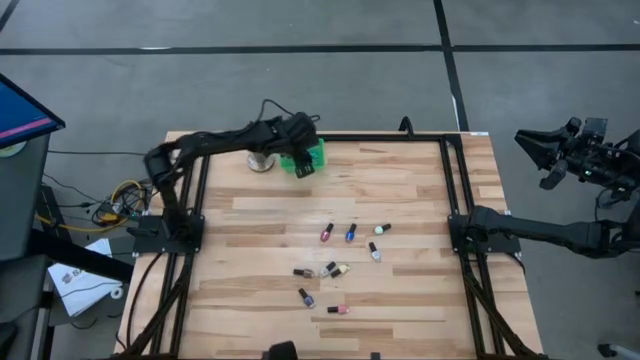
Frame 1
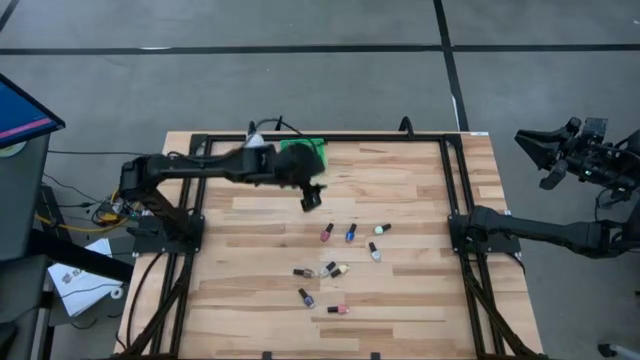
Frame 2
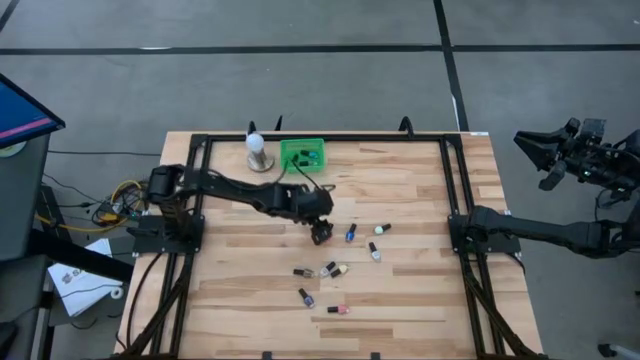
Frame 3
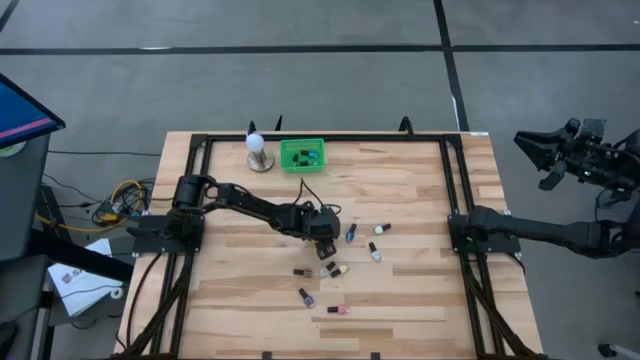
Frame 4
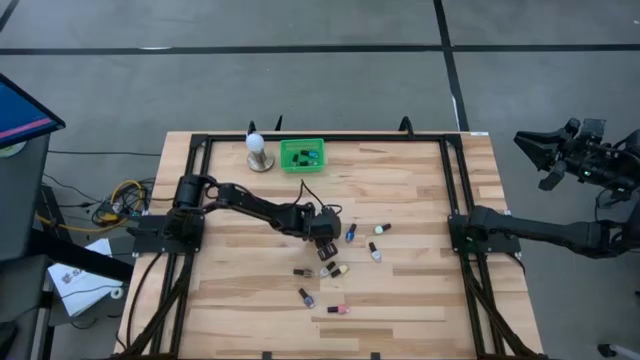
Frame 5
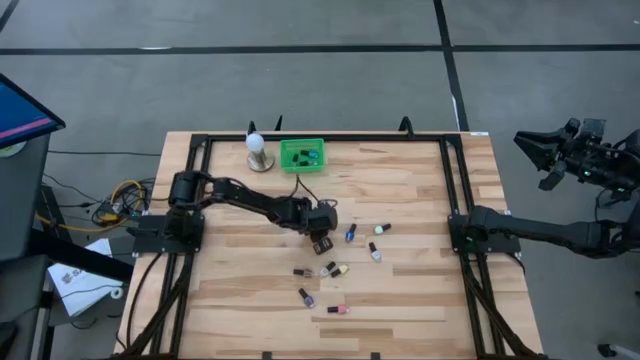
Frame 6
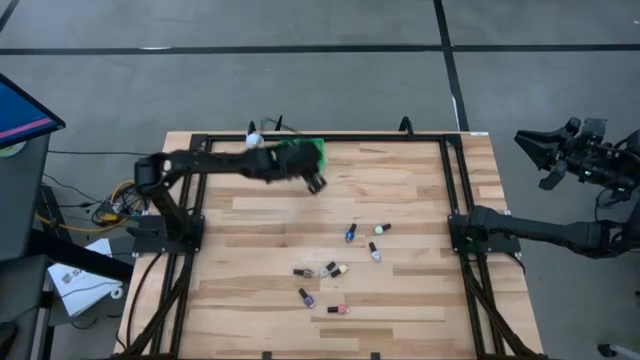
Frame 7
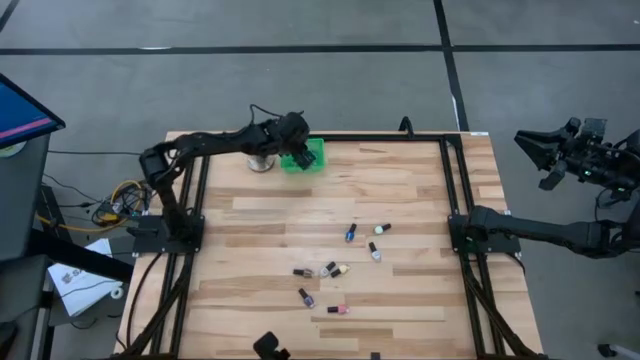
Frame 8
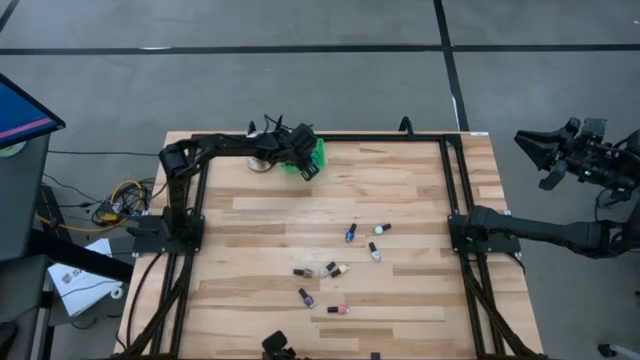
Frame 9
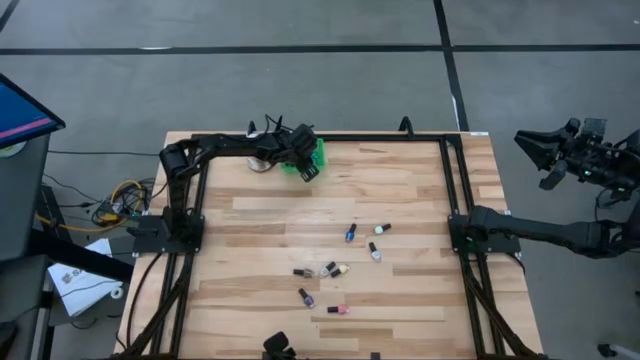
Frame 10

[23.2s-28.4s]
Task: Pick & Place Nail Polish
Put the dark pink nail polish into the green bin

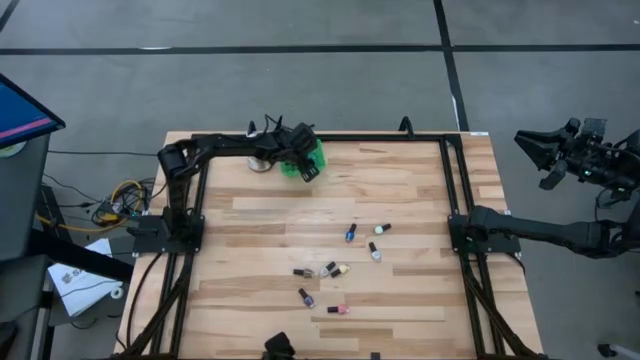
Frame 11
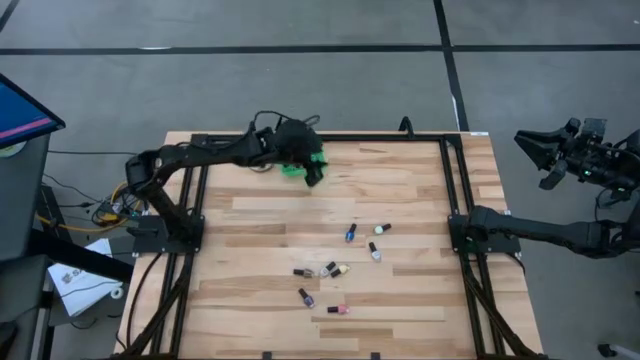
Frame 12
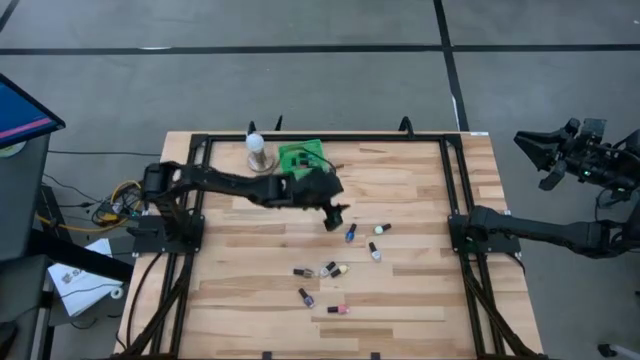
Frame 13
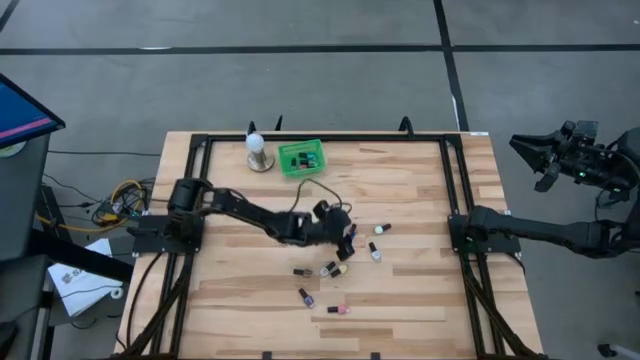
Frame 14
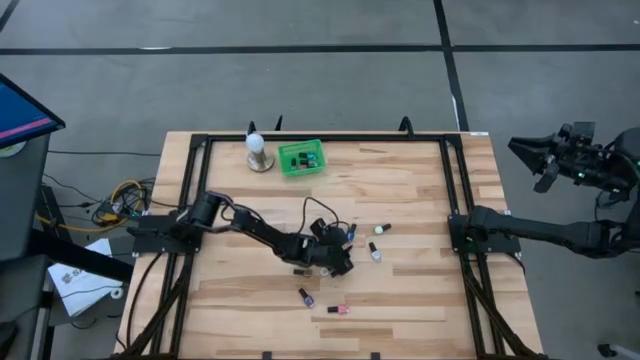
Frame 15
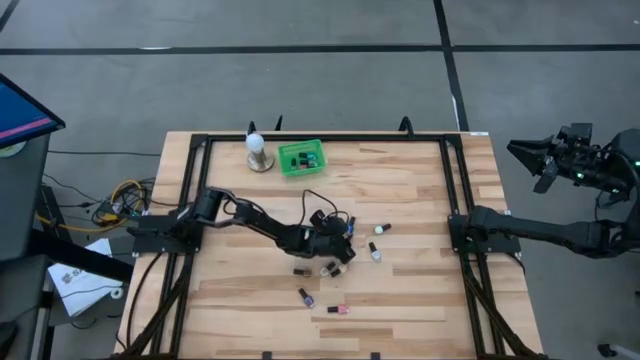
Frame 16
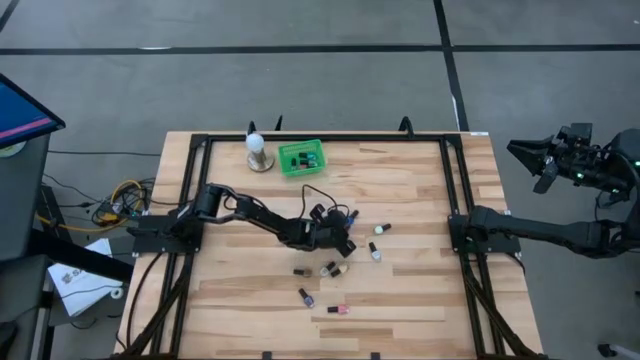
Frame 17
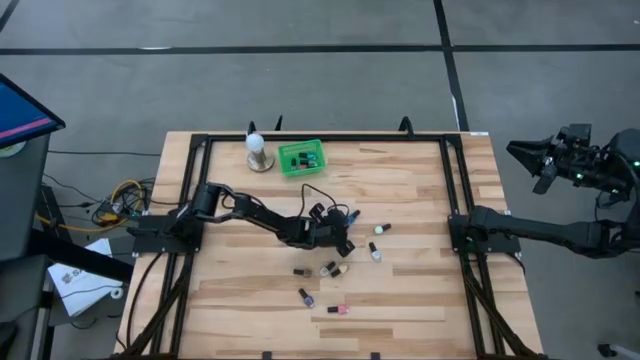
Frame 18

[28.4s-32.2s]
Put the dark blue nail polish into the green bin

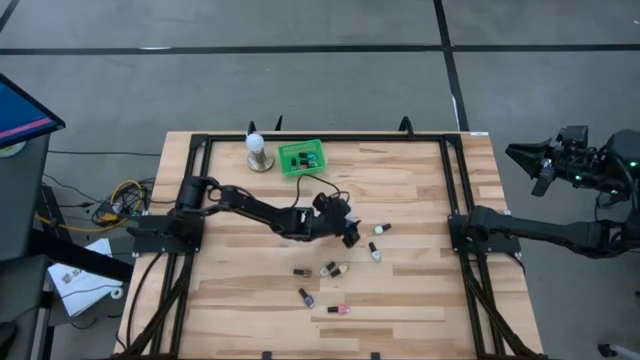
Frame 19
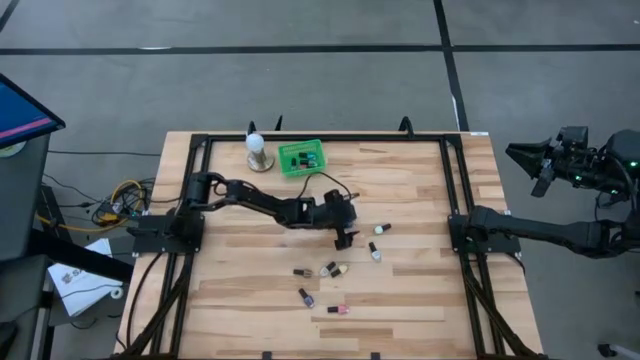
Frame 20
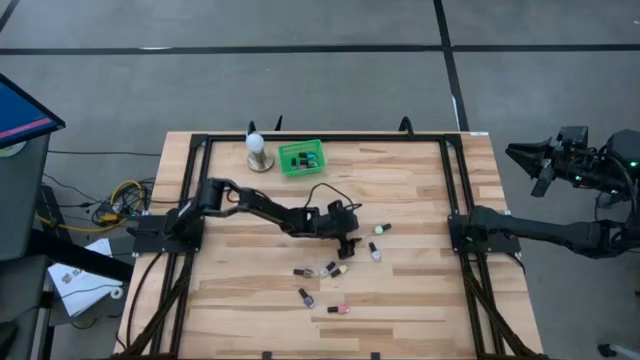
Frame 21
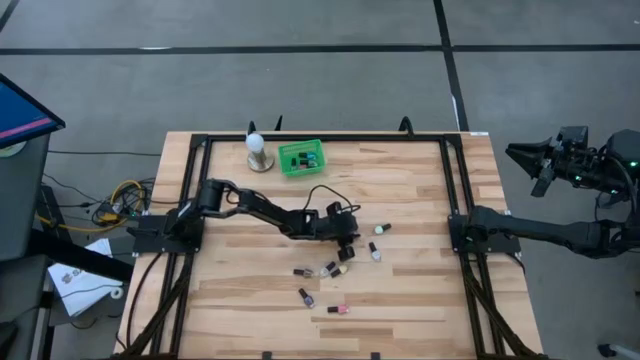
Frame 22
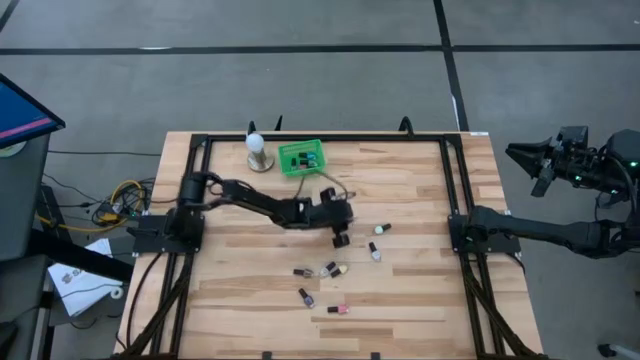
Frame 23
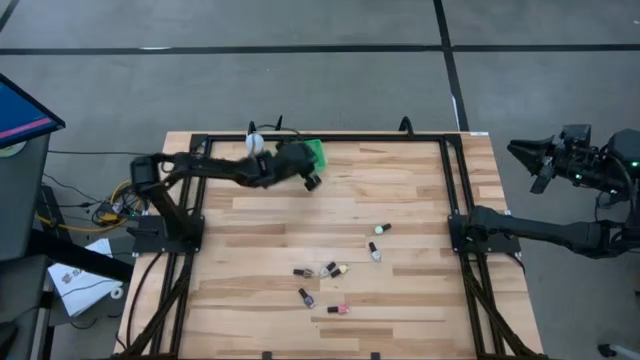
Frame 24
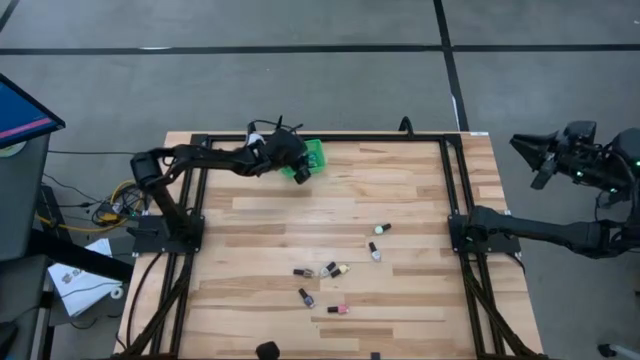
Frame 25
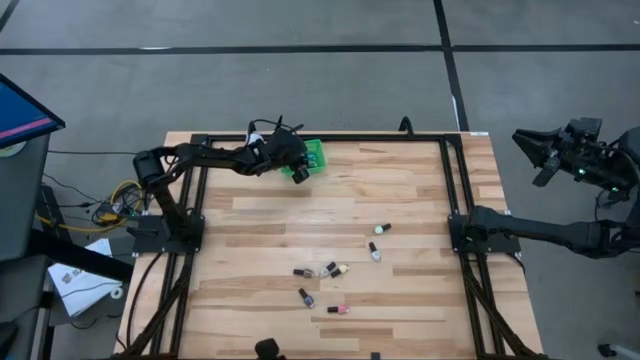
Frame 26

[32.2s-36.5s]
Put the dark blue nail polish into the green bin

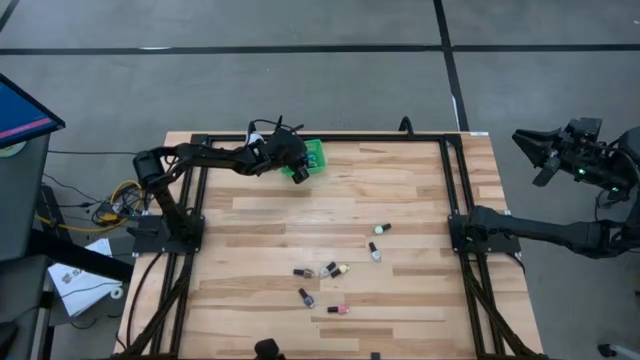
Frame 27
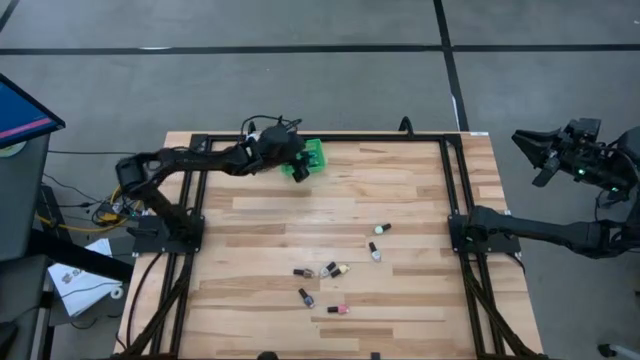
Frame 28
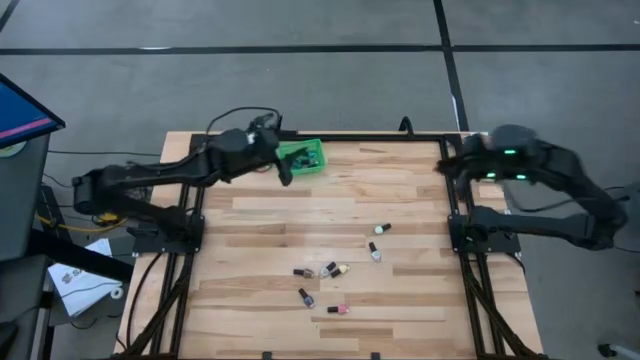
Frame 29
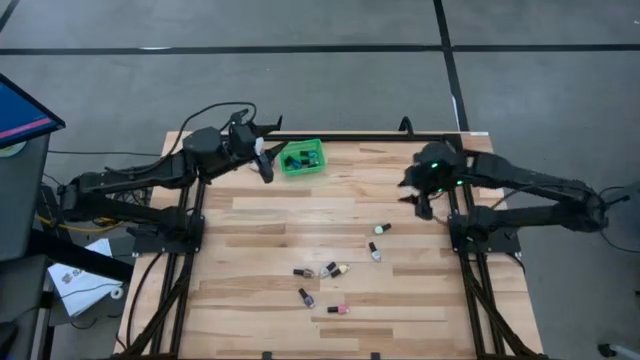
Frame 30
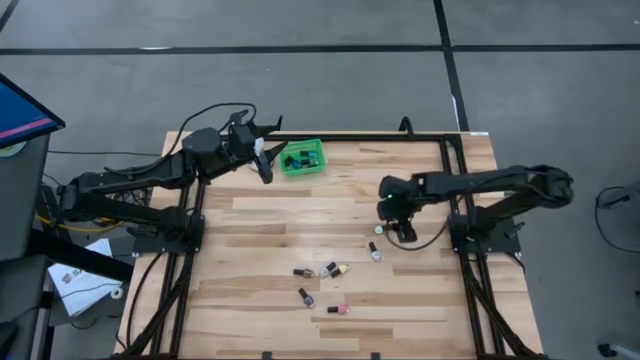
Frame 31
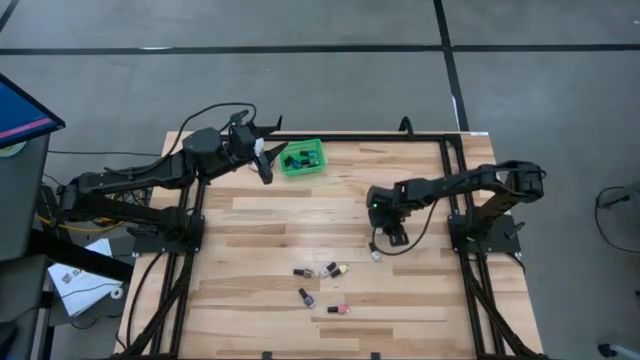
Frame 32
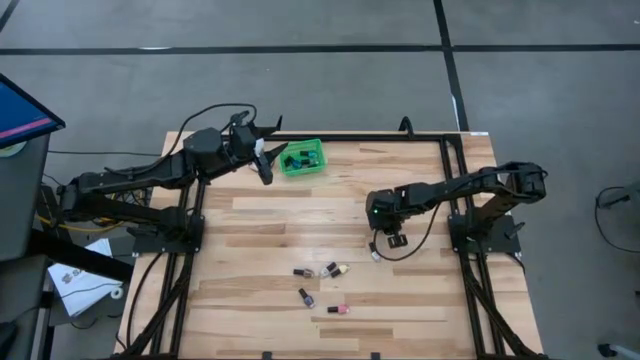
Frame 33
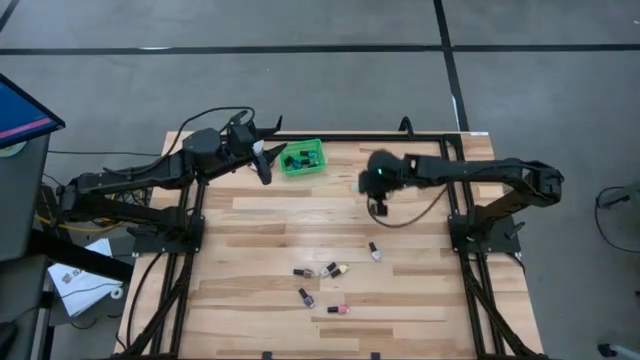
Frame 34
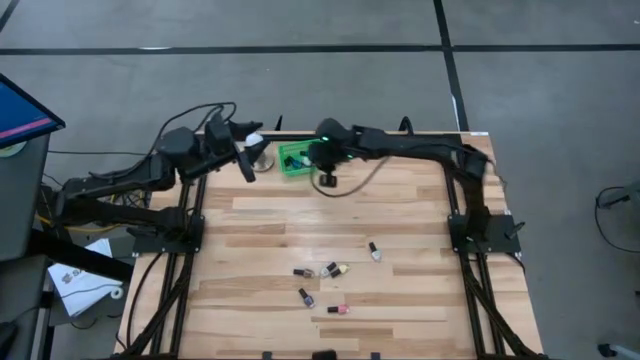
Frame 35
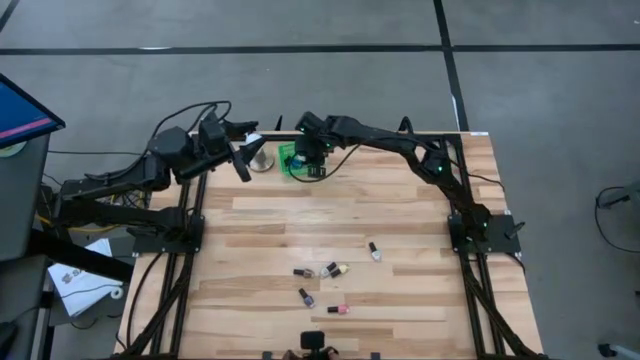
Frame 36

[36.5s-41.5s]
Put the light yellow nail polish into the green bin

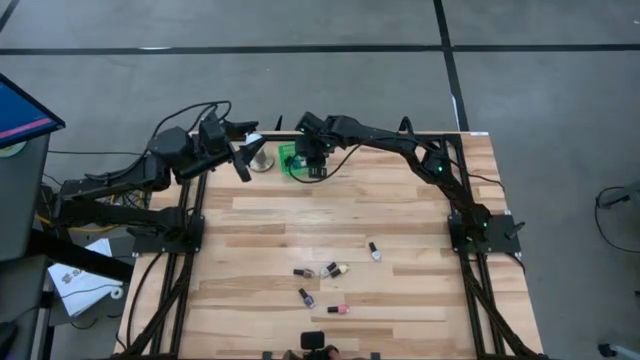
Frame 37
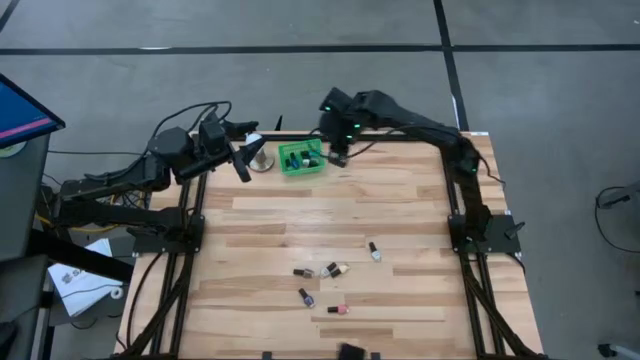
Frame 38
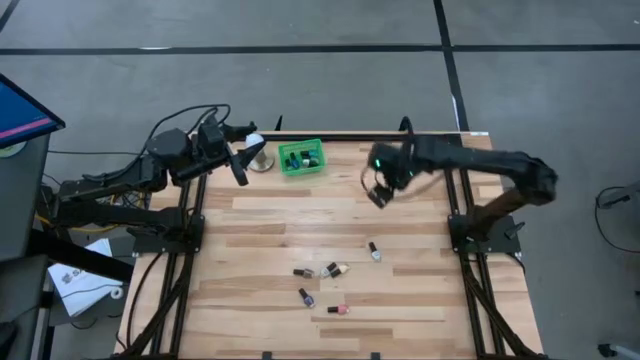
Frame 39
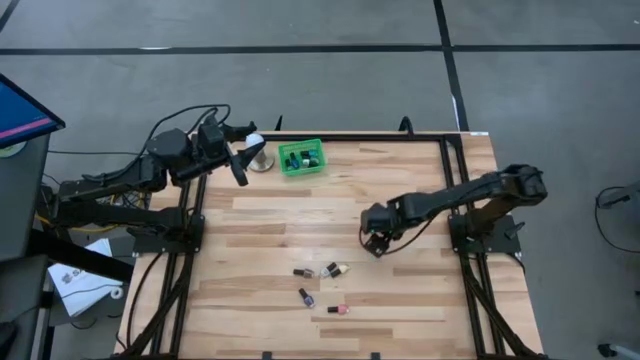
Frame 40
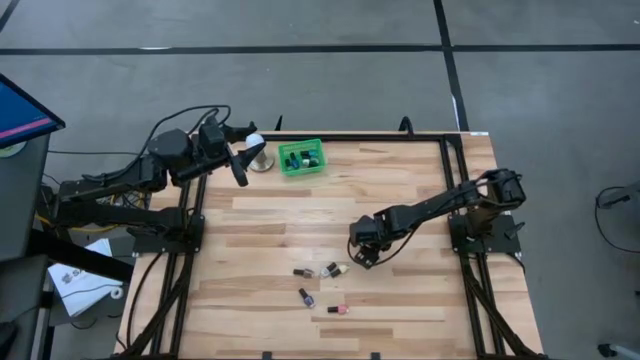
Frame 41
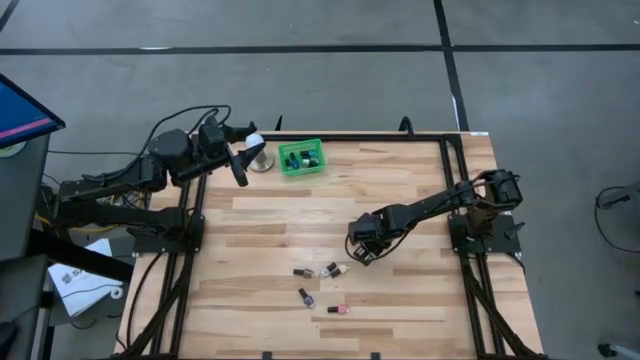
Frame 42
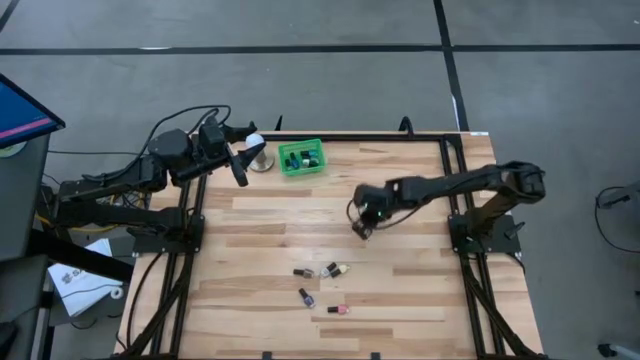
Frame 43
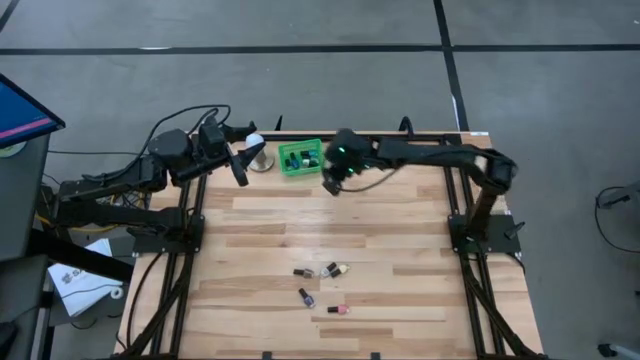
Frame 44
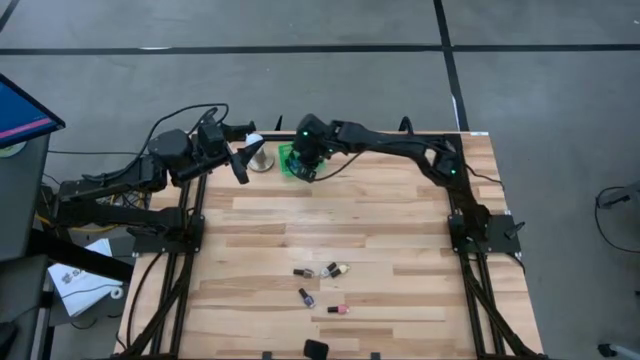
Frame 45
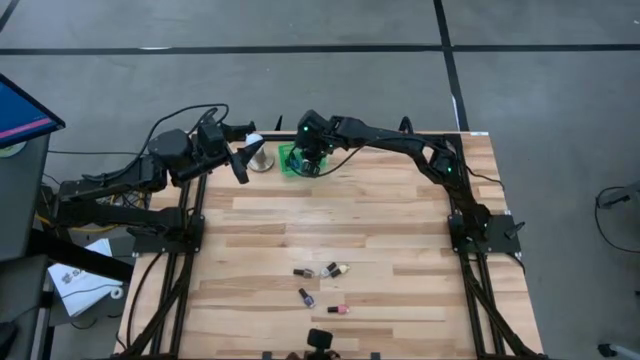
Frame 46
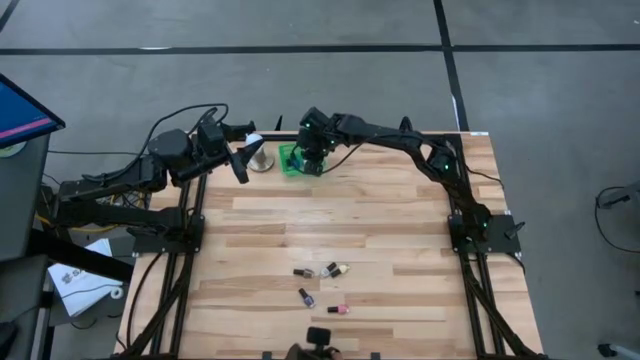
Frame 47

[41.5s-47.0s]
Put the white nail polish into the green bin
